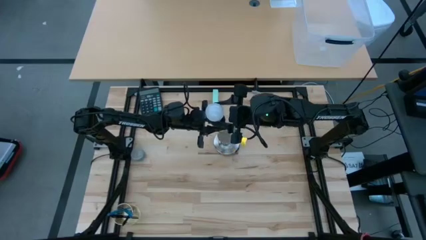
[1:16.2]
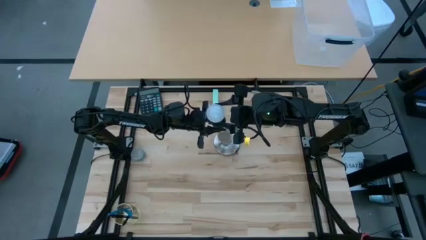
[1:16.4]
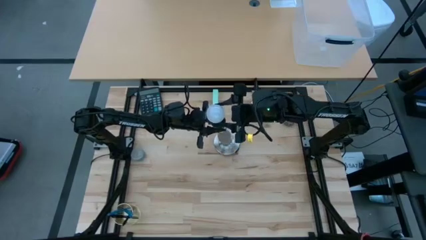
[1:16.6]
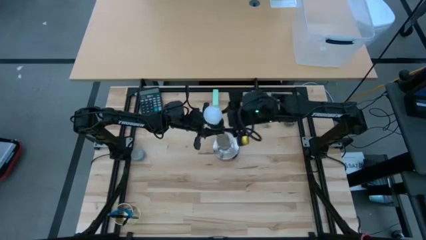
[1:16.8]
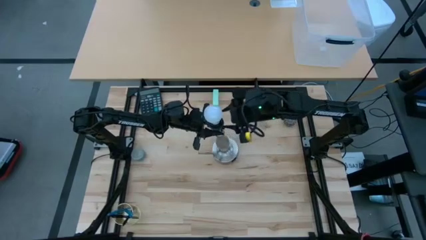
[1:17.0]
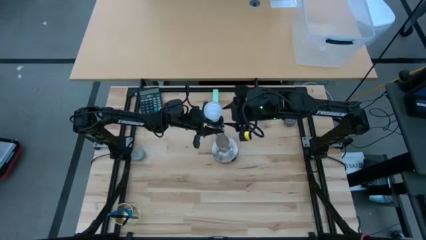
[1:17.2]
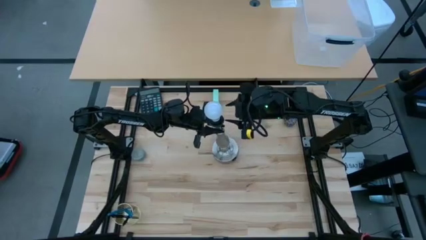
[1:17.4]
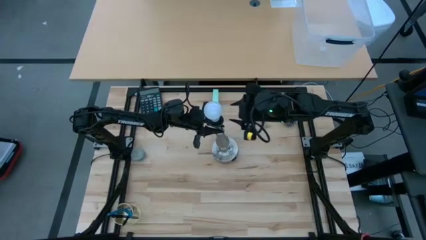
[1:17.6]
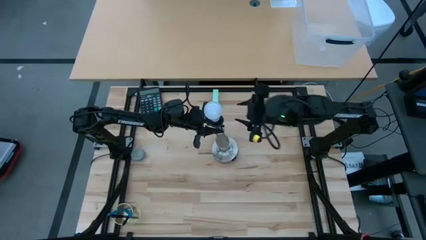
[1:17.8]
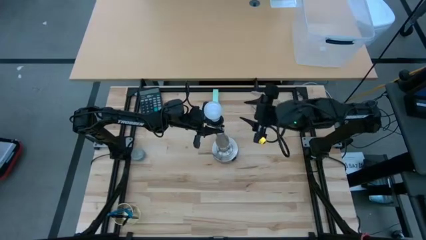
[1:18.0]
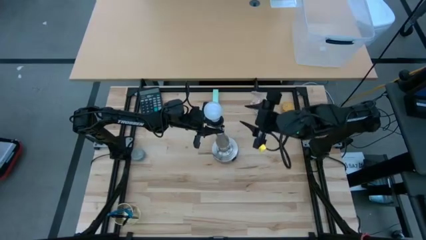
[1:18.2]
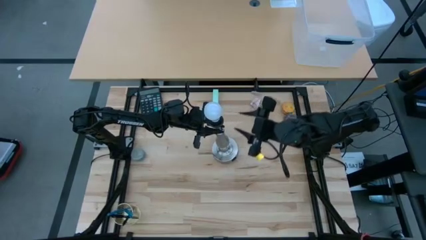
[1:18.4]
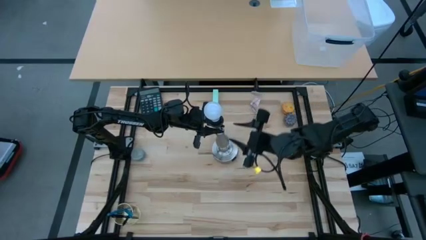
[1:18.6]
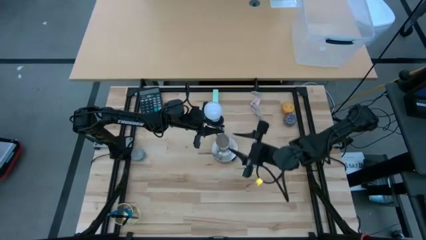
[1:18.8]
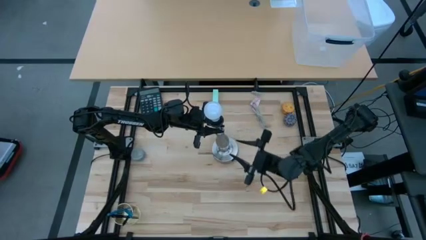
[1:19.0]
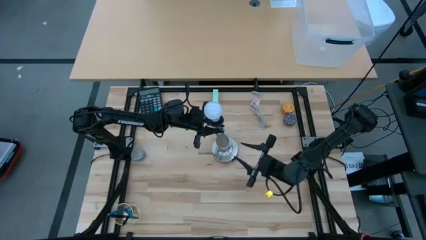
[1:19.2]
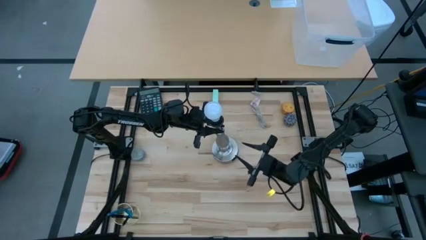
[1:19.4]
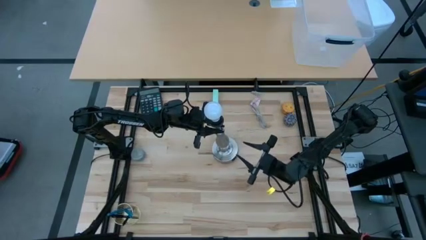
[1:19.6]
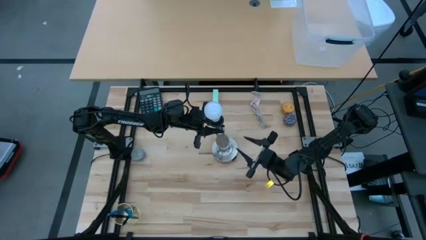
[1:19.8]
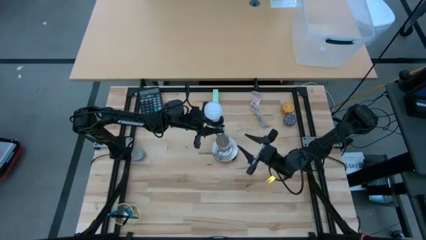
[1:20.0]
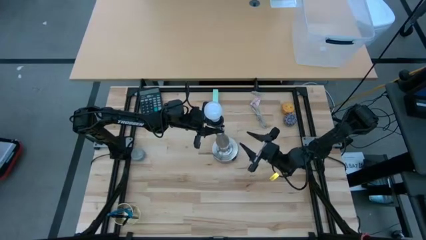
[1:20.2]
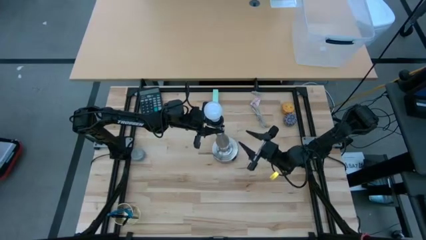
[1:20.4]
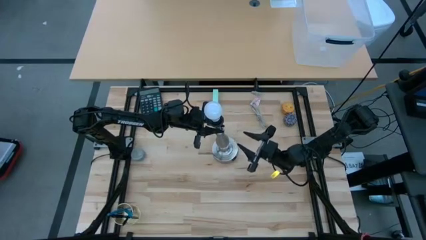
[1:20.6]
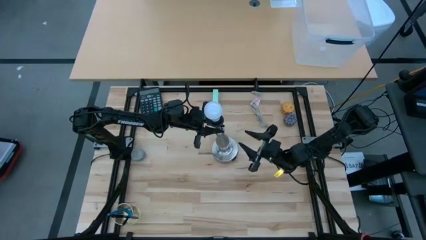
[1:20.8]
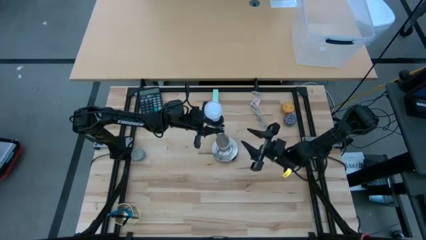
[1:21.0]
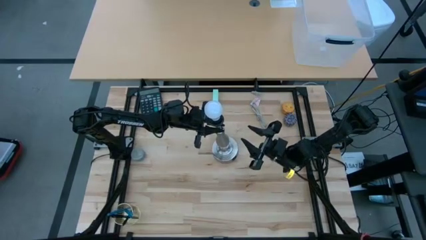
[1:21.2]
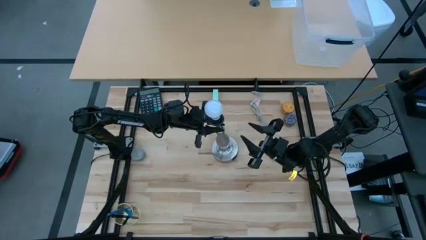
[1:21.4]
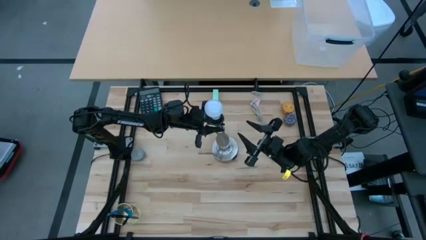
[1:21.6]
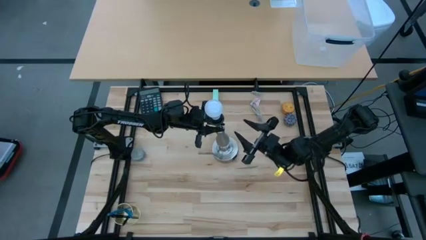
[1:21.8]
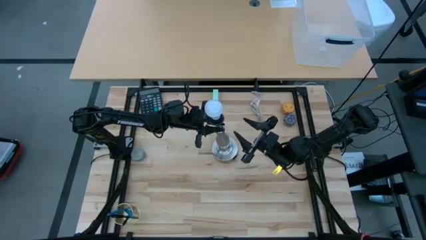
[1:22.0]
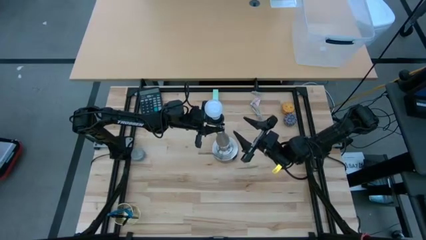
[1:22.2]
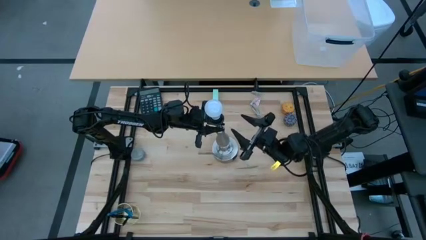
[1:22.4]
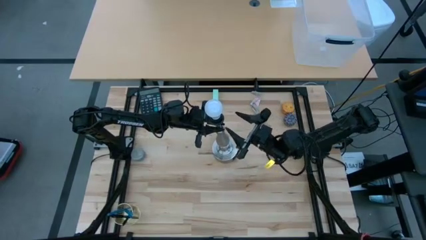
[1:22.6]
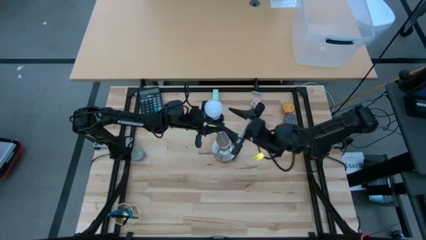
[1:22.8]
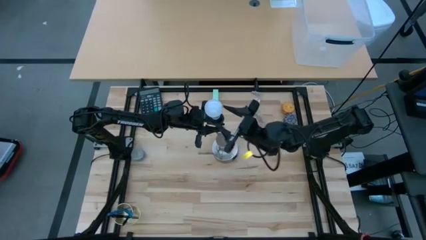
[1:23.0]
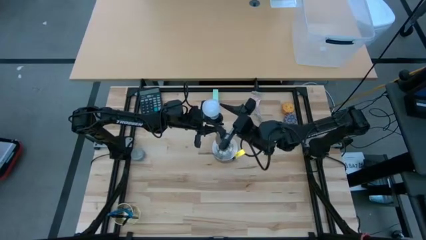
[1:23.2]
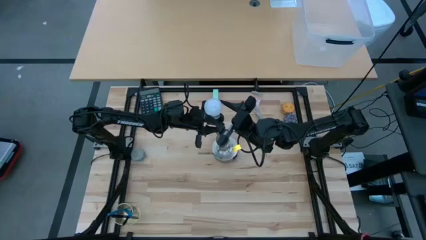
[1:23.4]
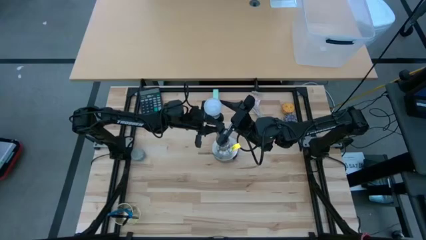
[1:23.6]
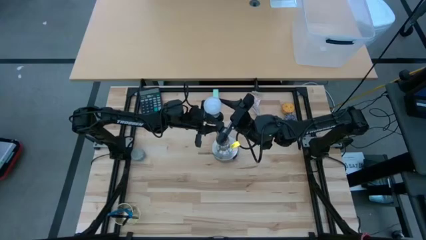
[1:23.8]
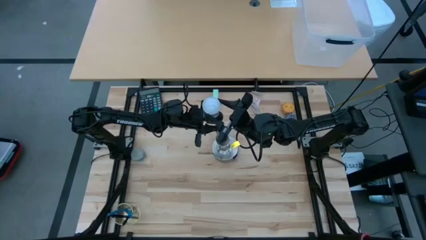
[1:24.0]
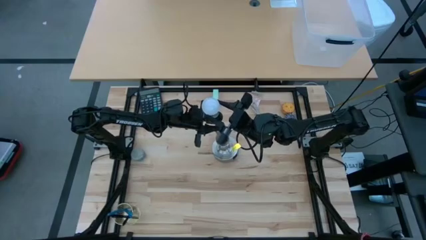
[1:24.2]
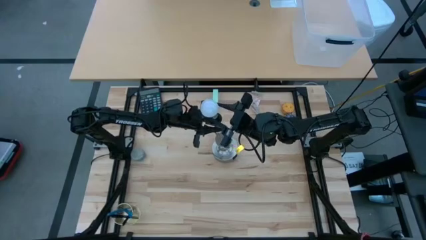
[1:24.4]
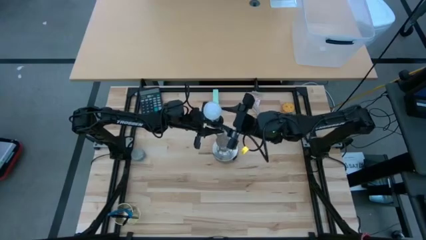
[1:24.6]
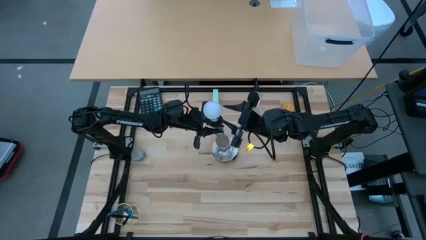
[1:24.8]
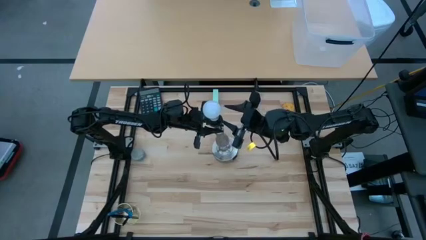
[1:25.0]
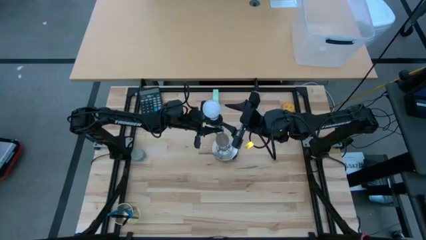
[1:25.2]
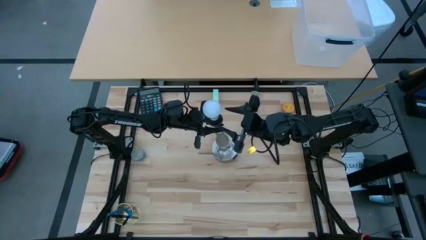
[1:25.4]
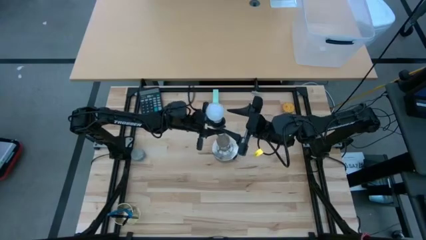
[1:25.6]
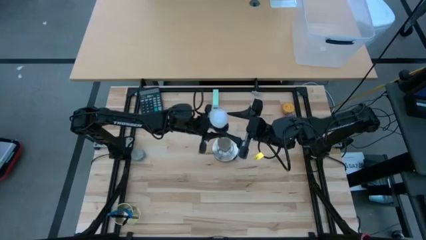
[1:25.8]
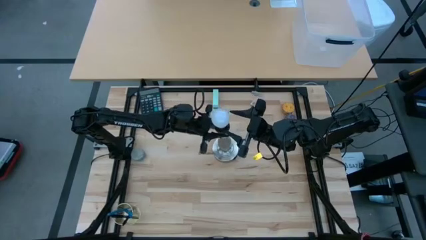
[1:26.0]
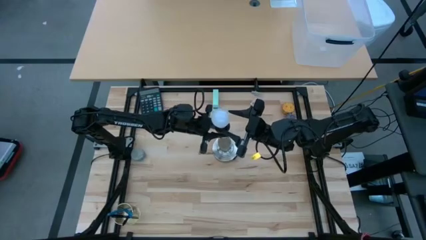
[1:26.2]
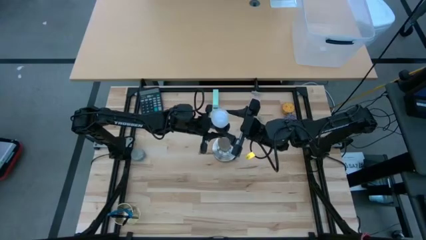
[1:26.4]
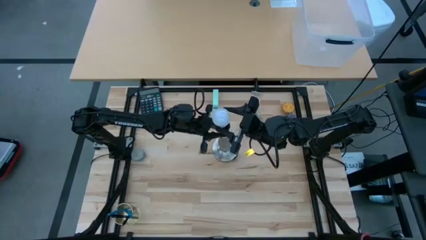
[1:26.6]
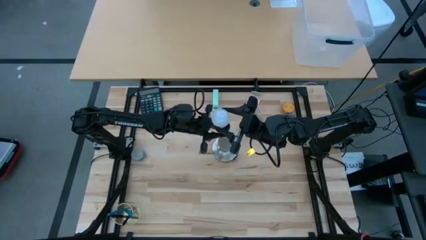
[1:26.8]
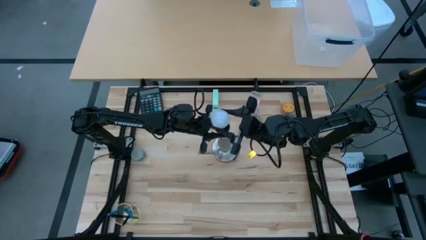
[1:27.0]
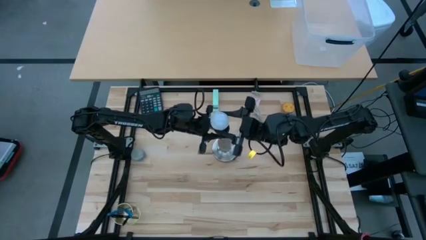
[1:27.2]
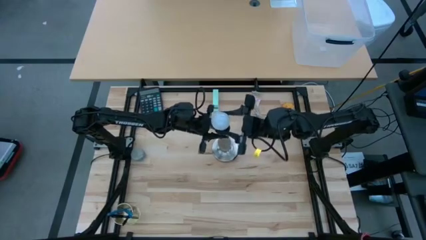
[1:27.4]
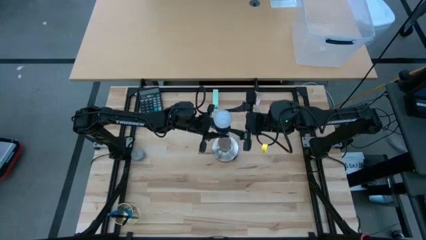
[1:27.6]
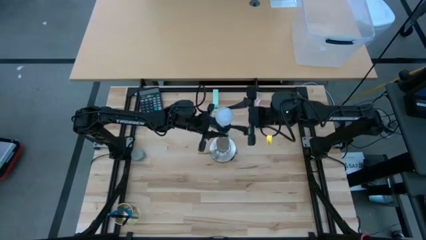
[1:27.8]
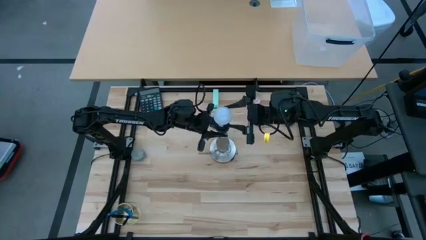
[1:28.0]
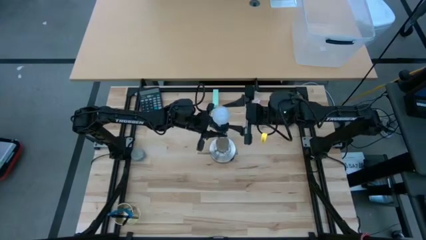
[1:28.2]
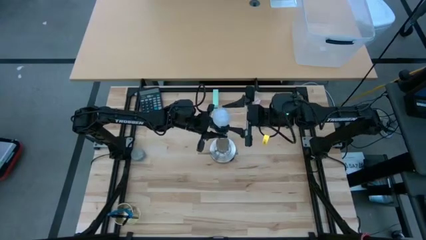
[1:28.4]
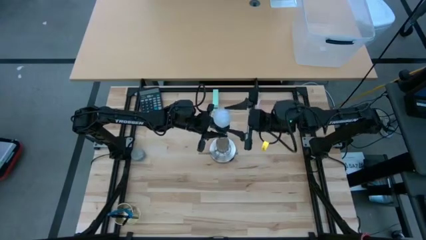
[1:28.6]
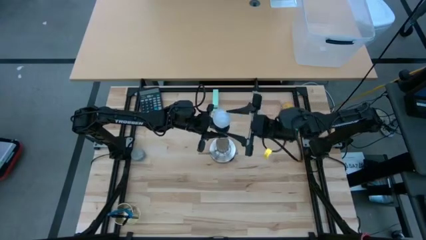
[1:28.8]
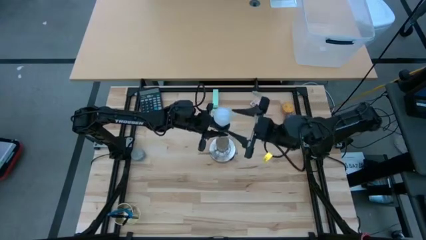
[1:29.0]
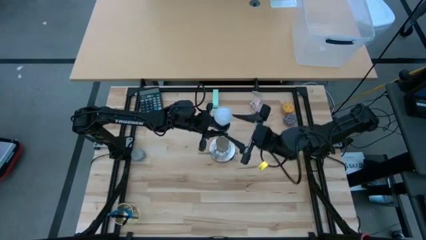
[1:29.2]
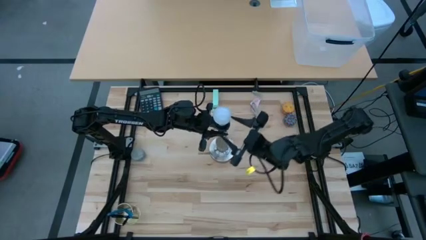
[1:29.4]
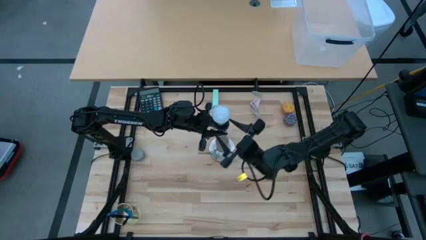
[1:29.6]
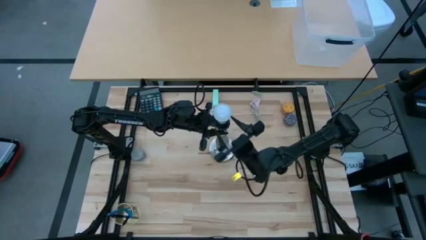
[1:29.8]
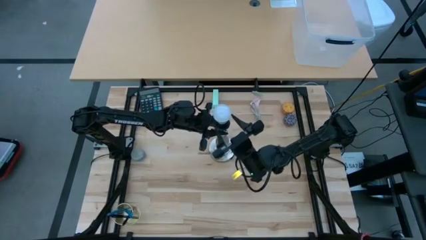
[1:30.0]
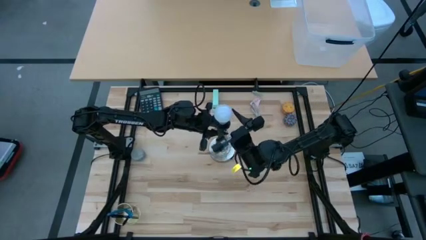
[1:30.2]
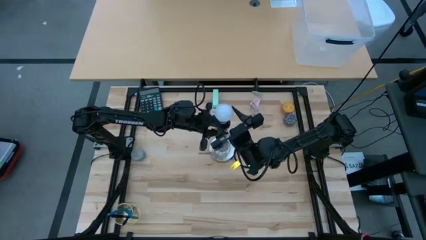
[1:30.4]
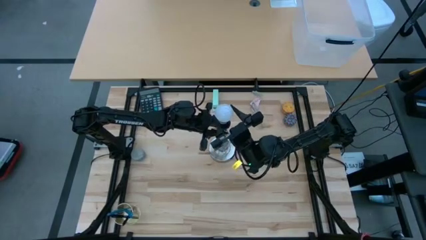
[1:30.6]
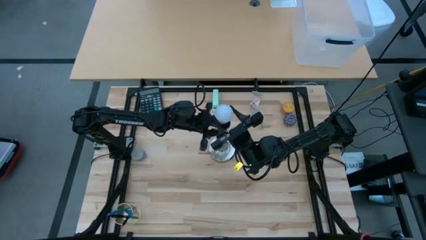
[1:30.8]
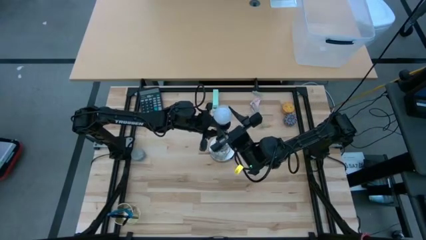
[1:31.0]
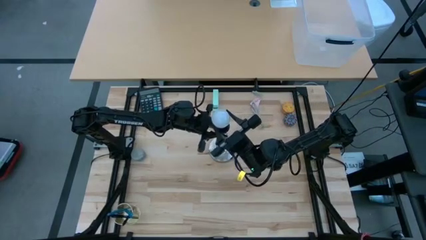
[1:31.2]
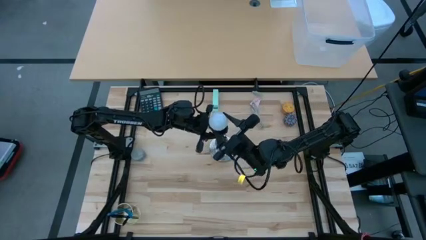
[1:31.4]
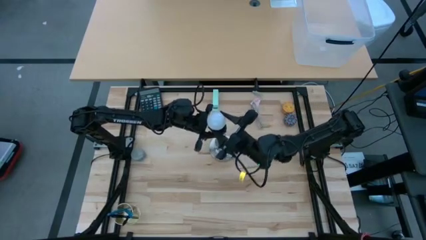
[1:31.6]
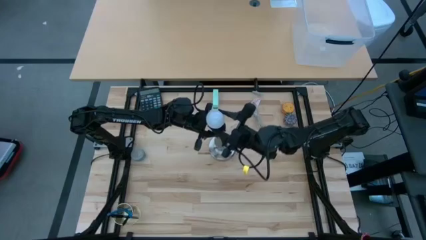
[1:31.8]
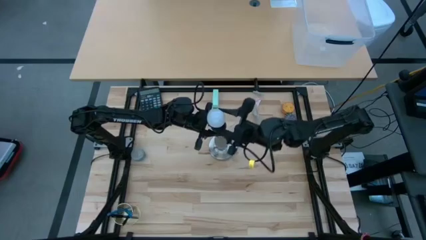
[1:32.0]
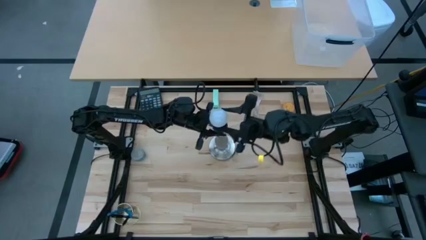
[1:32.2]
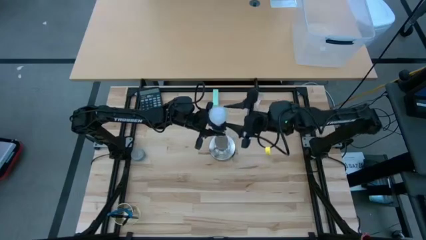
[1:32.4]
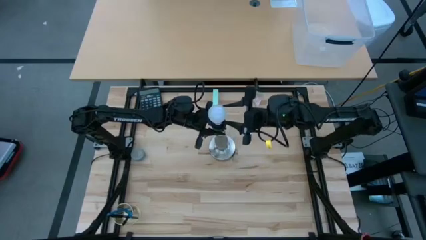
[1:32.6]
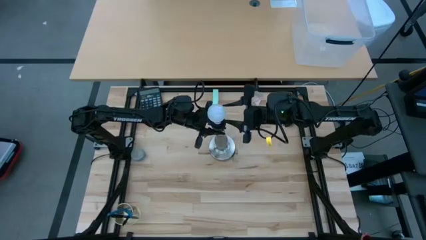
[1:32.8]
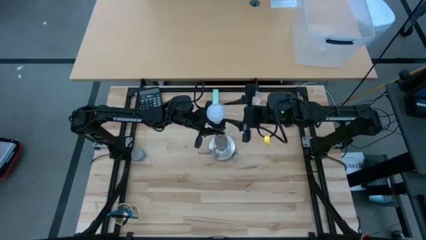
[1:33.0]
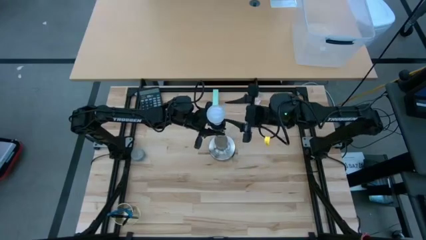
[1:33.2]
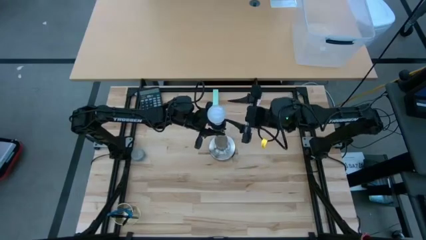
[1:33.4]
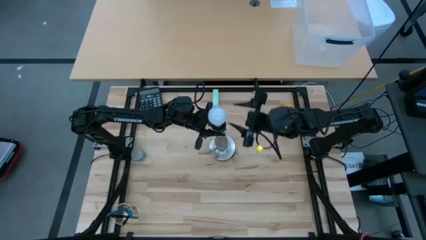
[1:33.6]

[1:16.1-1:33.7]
Task: Screw lightbulb
Remove the white lightbulb from the desk lamp
